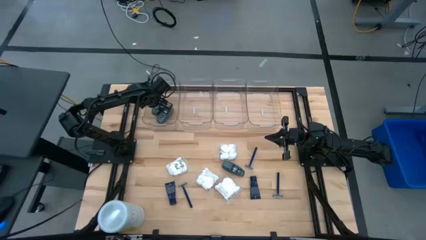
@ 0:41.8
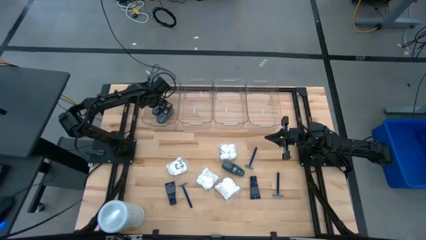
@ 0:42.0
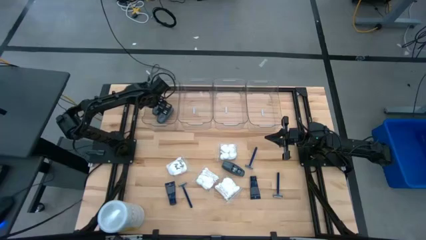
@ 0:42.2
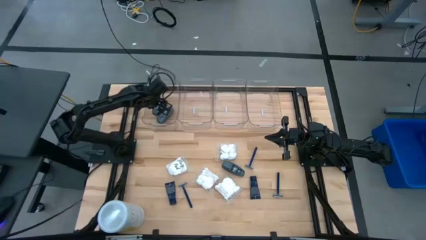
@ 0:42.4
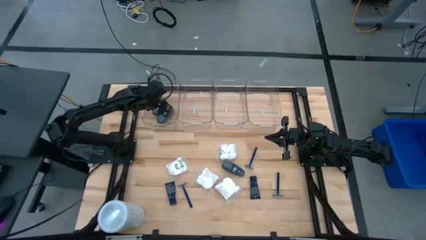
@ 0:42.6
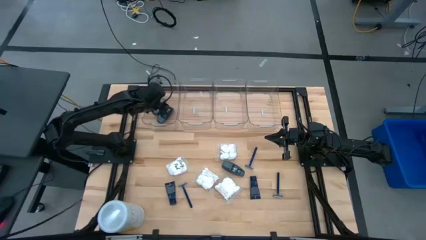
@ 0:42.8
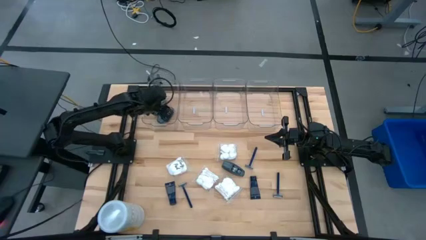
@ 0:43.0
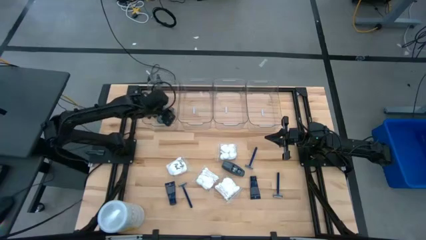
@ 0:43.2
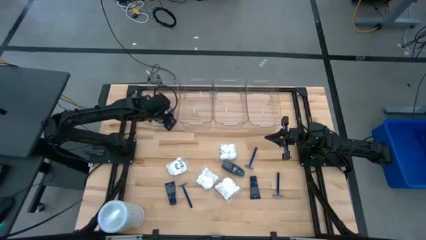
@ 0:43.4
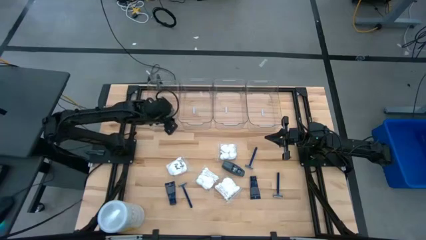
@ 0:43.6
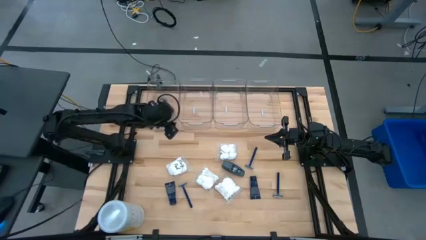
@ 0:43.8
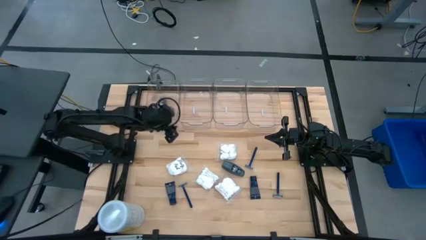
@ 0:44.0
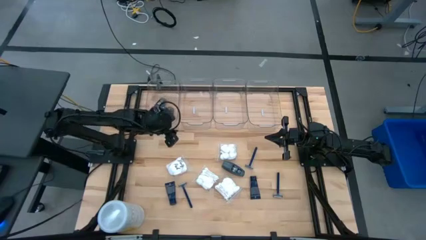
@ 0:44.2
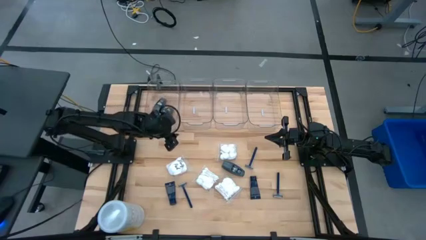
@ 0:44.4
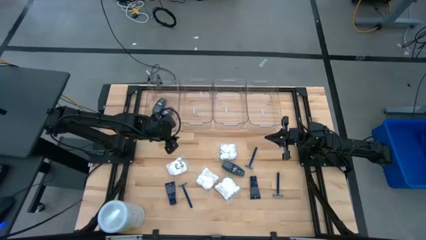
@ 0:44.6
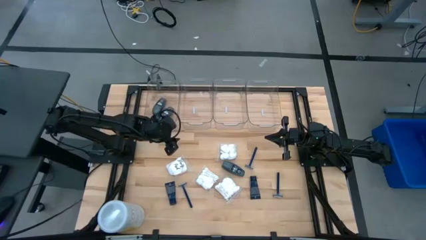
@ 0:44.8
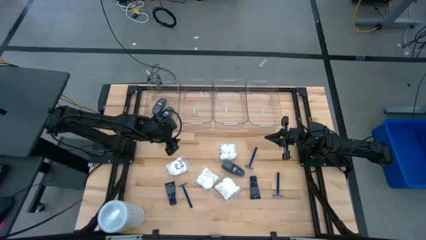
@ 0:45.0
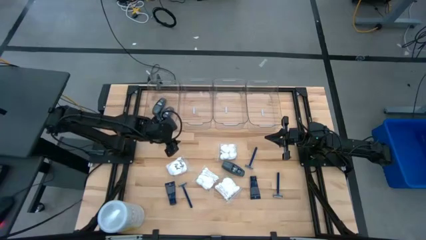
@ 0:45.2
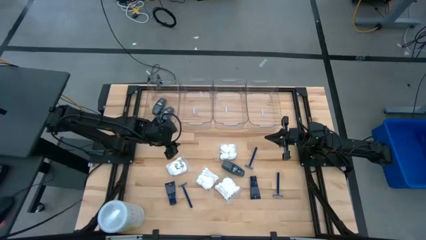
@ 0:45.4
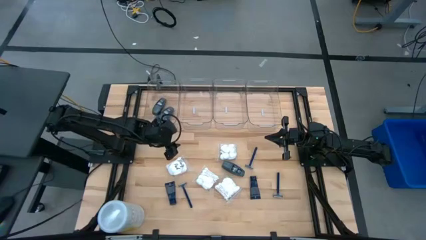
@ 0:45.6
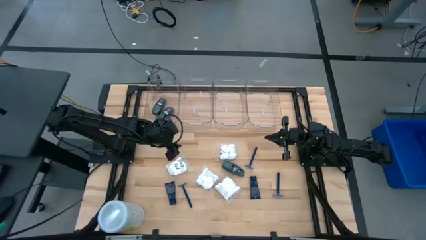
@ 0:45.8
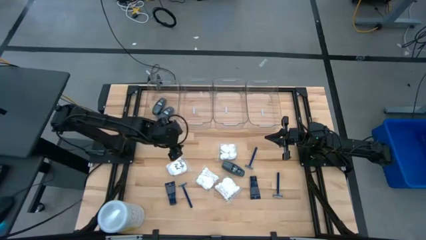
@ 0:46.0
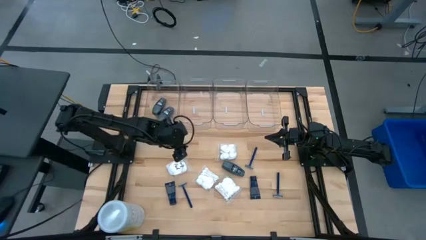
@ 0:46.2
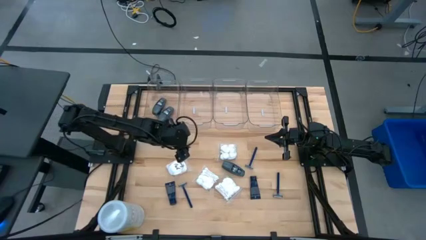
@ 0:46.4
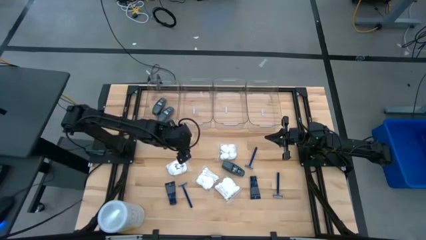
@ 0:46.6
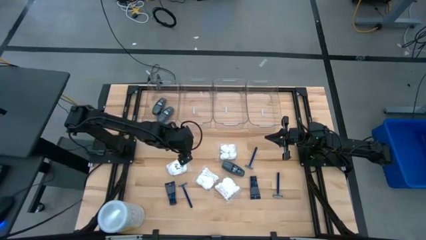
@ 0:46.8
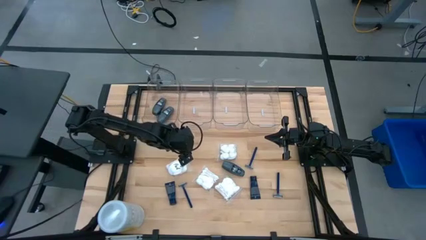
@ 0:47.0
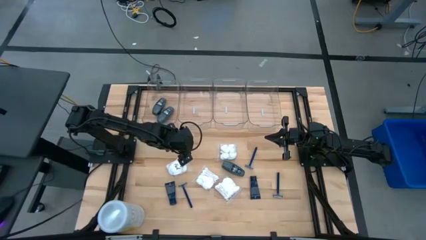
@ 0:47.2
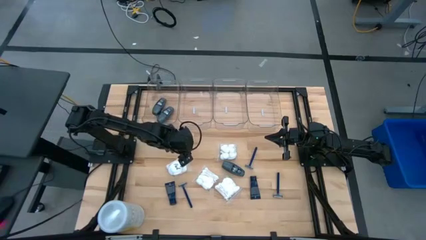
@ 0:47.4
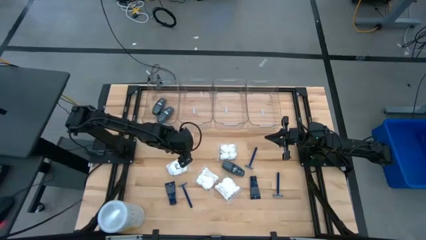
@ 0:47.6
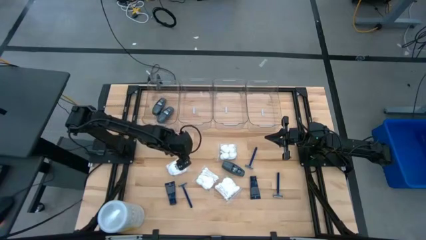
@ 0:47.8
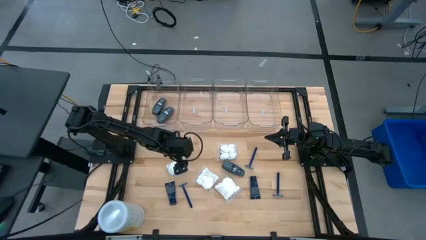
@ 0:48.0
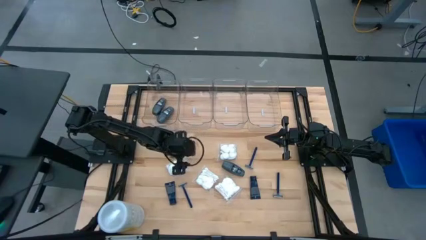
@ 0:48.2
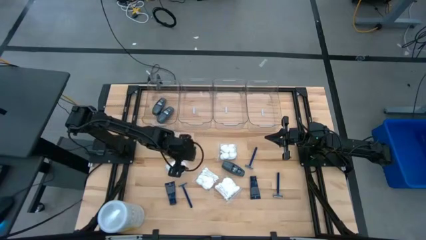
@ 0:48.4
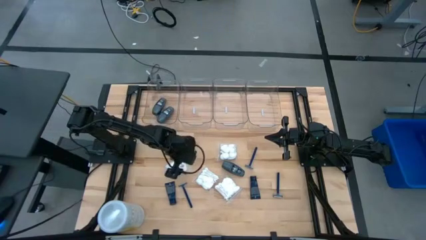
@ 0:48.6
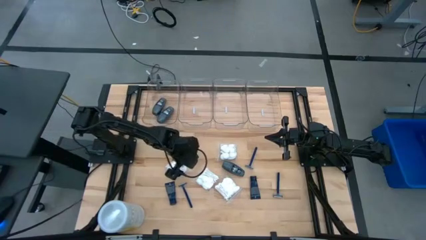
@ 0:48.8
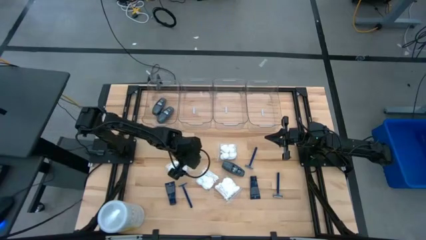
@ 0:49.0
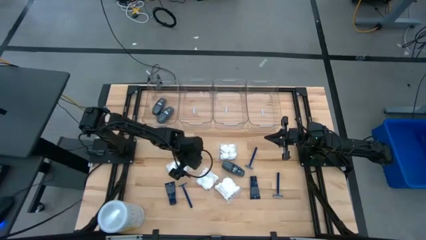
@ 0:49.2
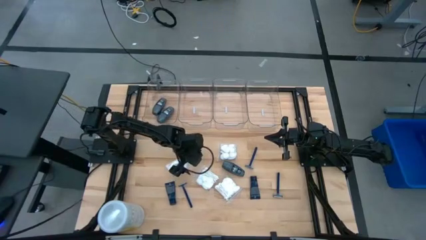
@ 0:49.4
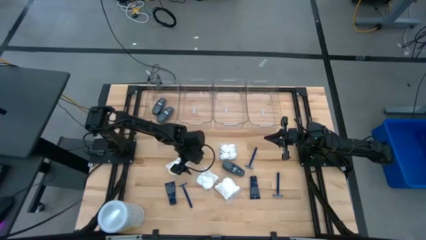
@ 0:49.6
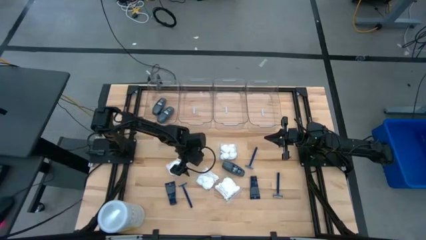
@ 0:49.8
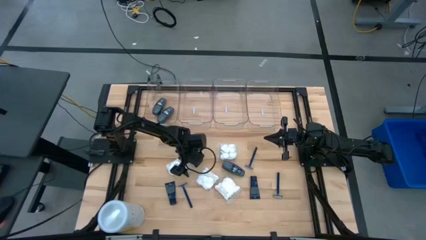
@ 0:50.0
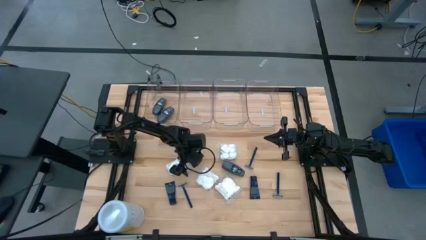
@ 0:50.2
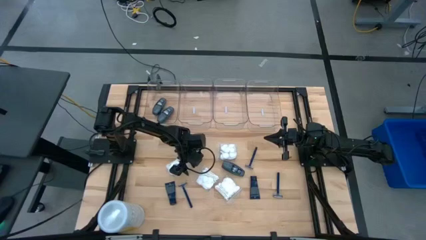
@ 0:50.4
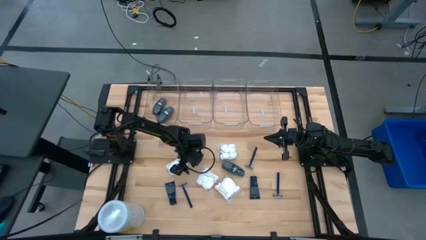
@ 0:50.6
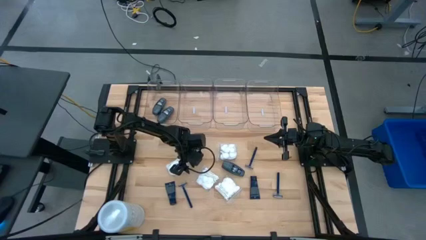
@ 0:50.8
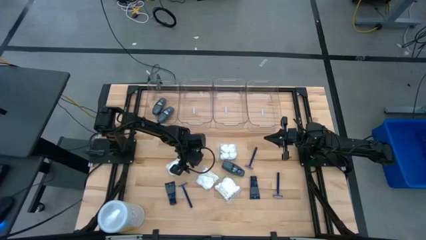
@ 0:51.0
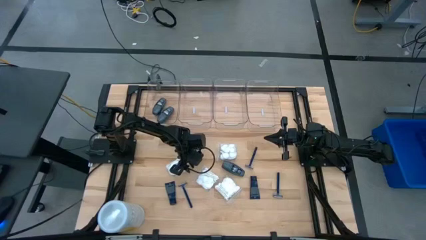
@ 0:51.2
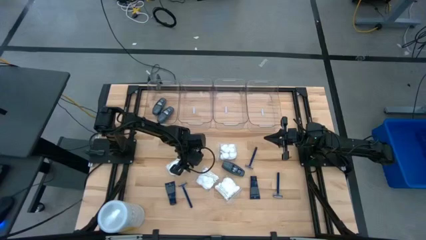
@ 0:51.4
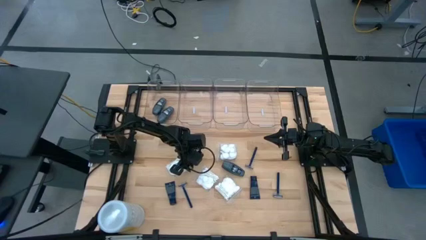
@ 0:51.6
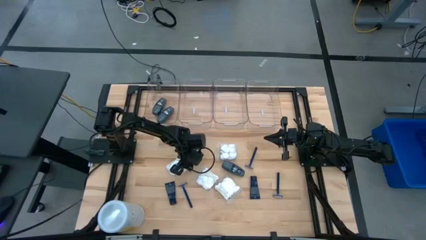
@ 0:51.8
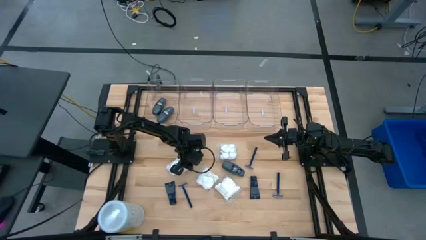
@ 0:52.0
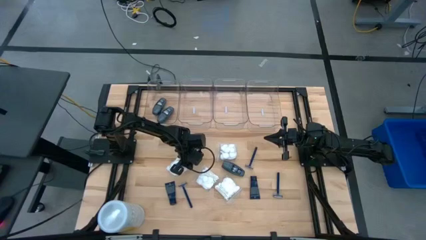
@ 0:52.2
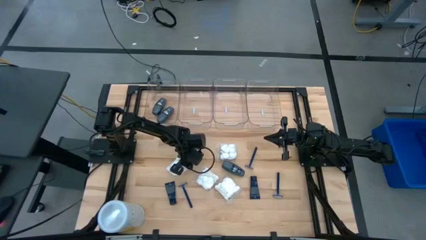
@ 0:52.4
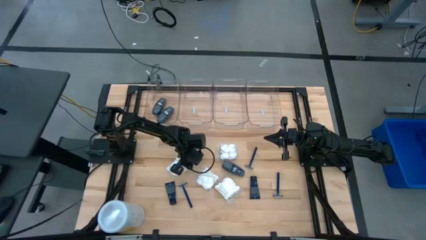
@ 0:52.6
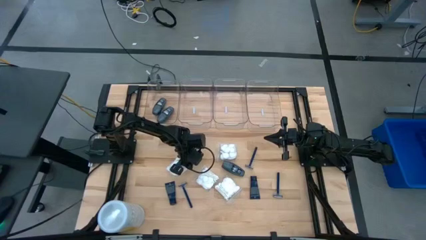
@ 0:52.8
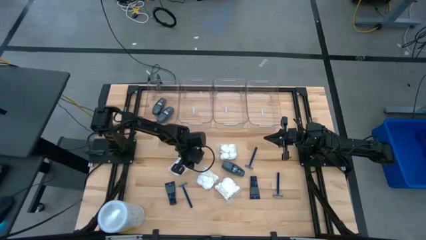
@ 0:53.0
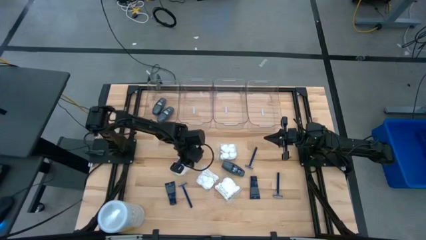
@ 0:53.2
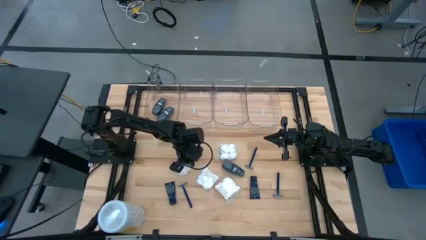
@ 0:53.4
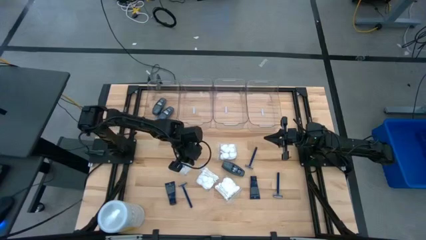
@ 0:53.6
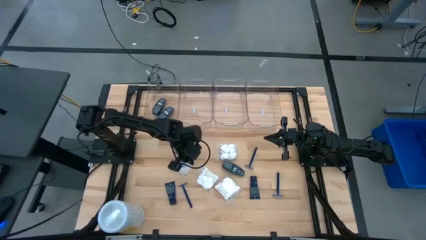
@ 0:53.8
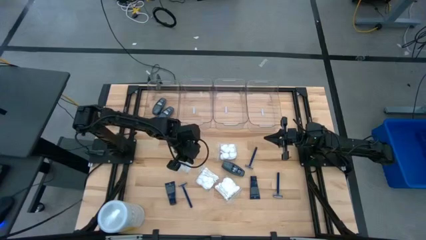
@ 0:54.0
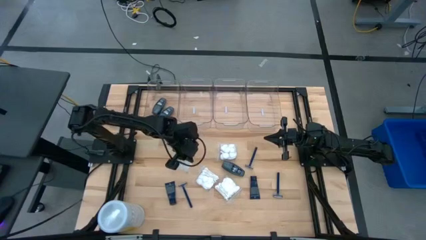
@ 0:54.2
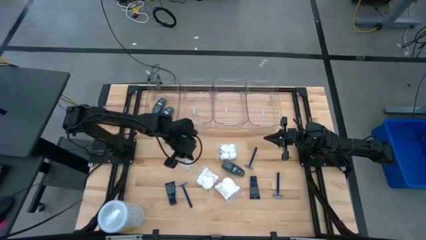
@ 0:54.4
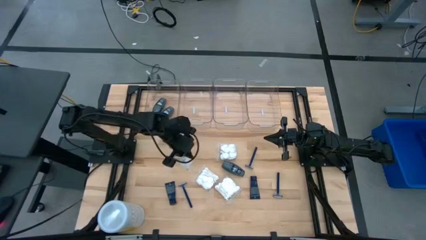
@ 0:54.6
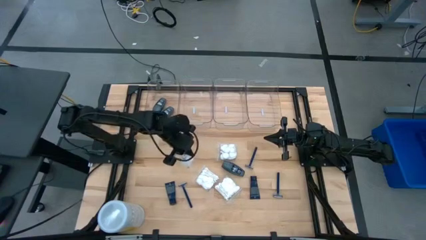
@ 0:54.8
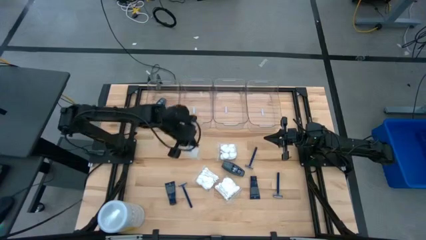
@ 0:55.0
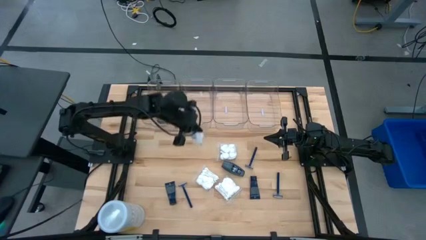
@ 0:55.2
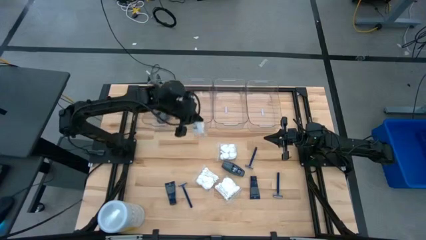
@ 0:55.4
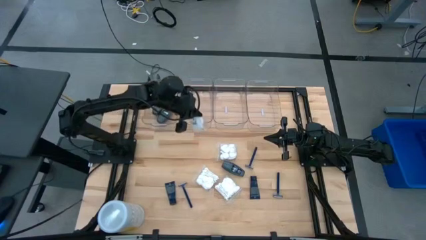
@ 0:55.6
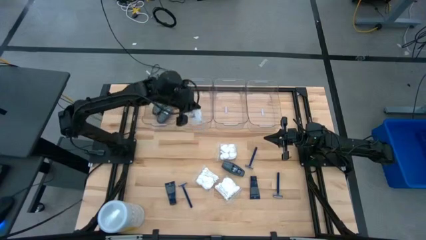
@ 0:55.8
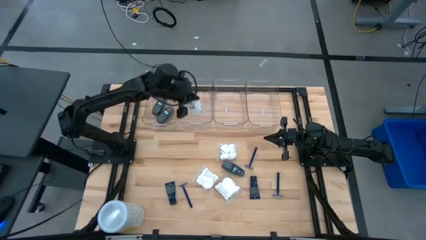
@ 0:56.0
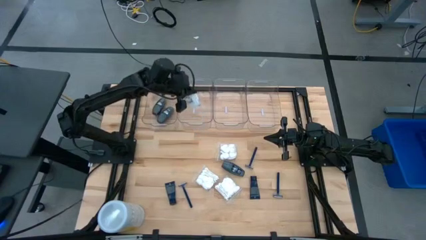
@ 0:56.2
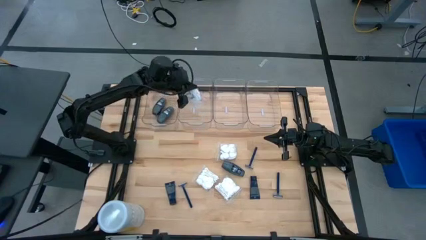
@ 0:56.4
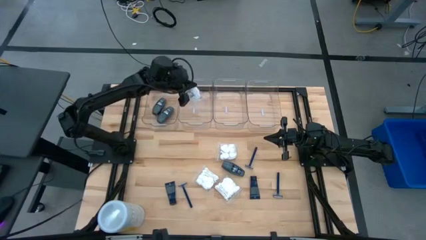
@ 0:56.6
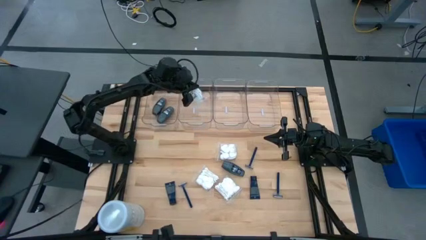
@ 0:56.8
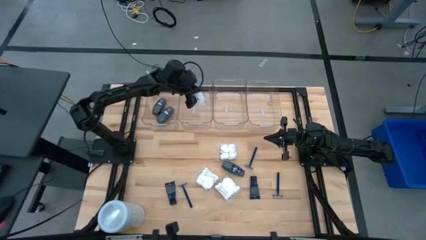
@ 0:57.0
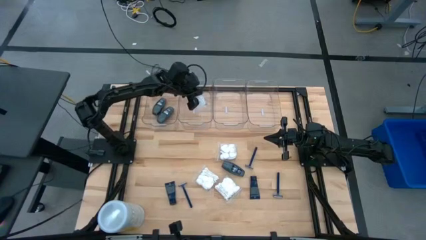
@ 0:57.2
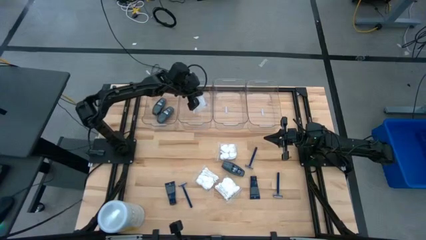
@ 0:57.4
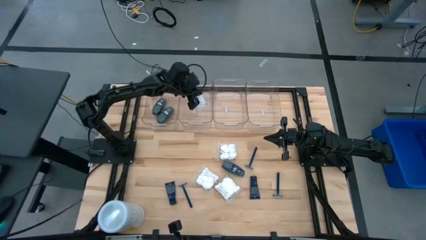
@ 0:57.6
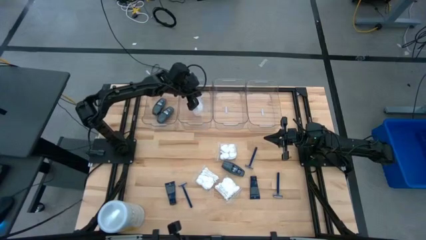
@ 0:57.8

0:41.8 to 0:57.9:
Task: Pick & Place Travel size toiletries
Put the white vanity pack into the middle left transparent bin

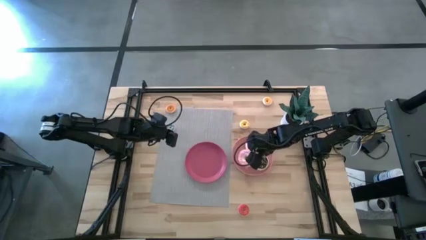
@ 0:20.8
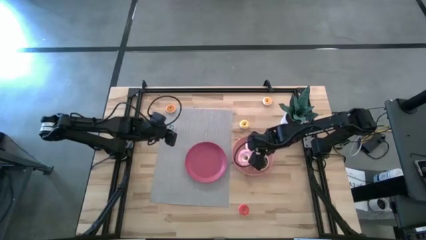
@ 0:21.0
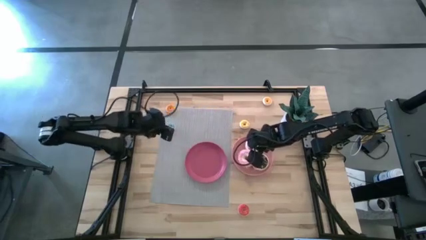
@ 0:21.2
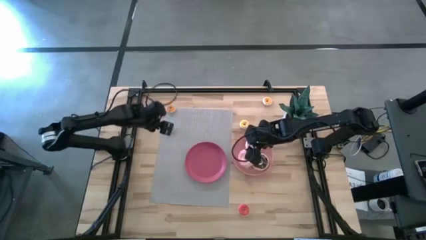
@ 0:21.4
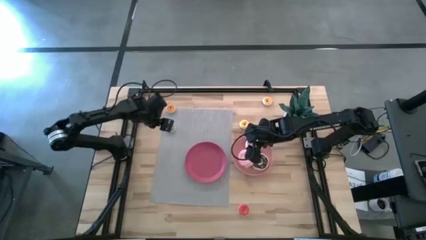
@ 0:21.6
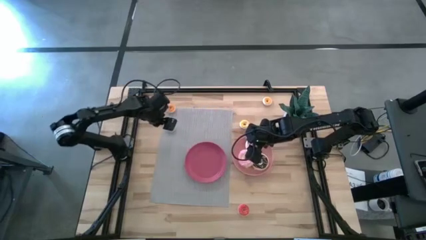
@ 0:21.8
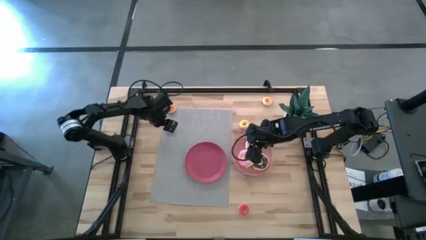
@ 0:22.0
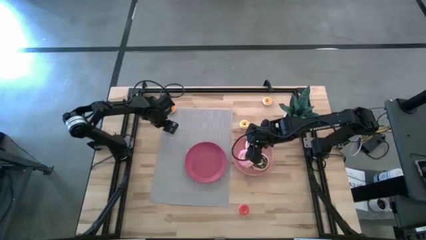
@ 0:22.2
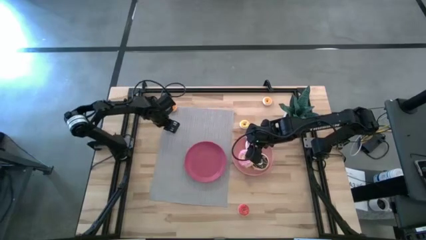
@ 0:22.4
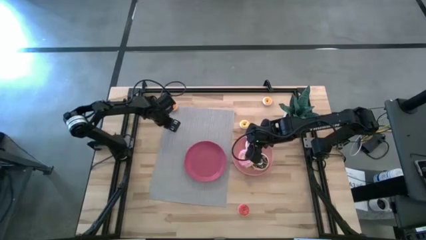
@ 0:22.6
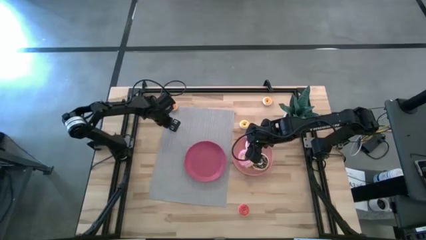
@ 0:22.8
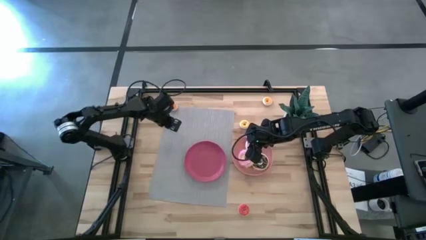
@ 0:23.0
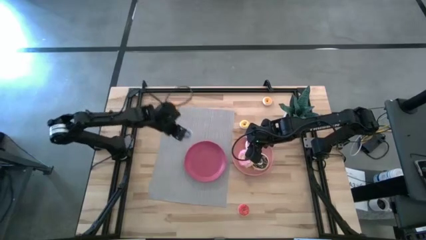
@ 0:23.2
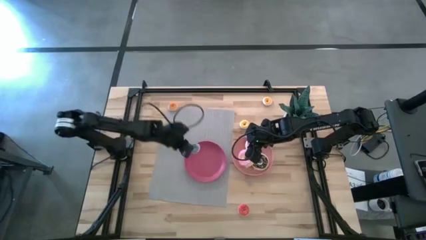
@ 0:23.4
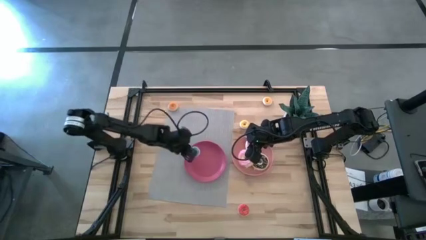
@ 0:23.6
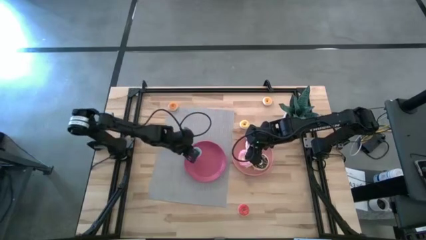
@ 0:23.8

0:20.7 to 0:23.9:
Task: Pick & Place donuts
Put the small blue donut on the light pink plate
